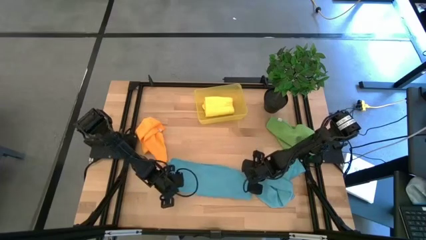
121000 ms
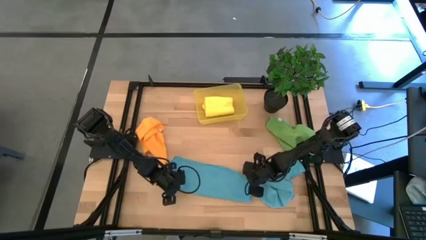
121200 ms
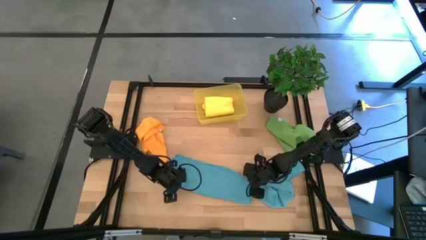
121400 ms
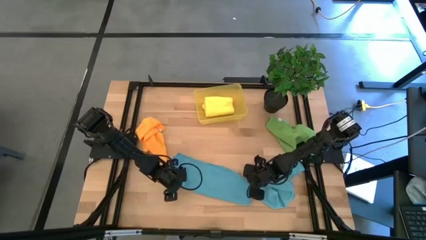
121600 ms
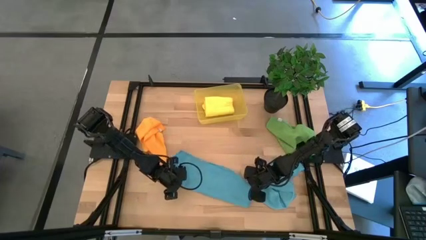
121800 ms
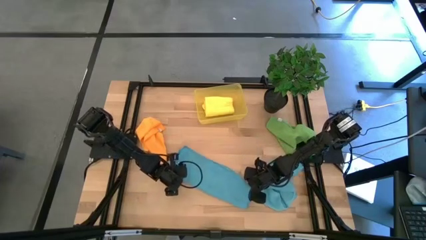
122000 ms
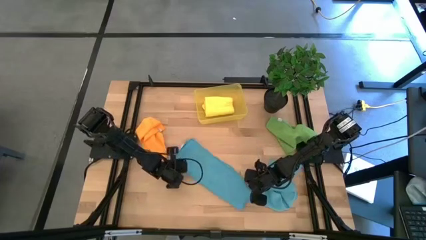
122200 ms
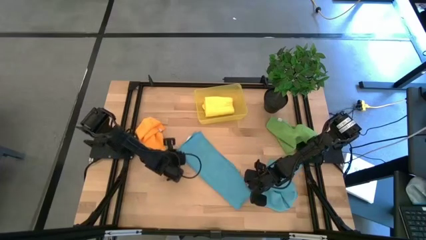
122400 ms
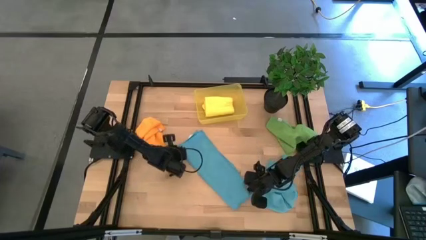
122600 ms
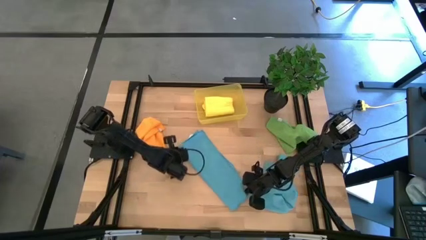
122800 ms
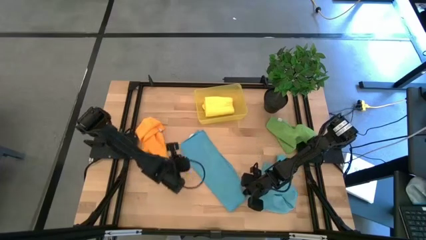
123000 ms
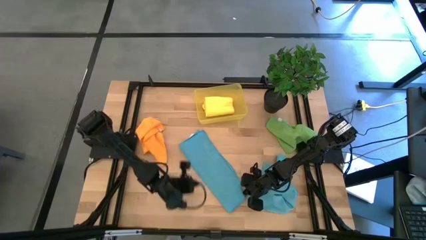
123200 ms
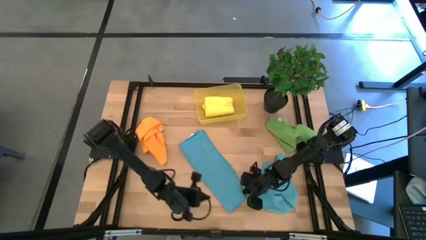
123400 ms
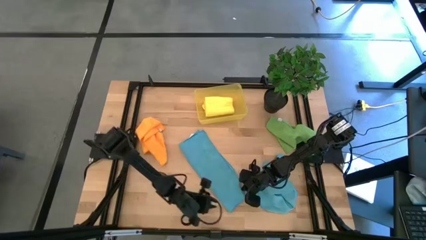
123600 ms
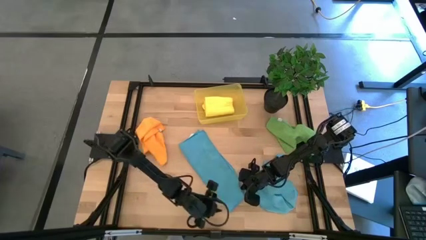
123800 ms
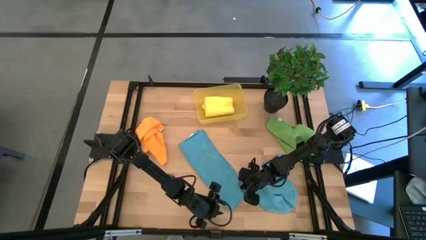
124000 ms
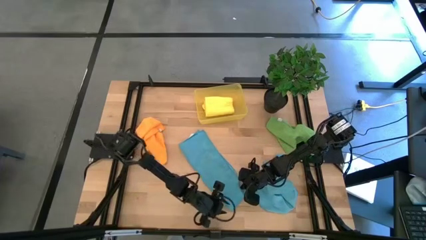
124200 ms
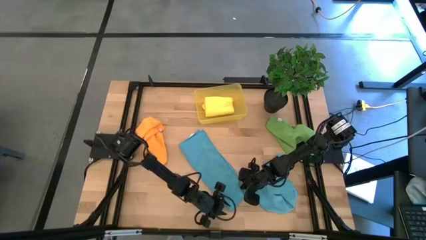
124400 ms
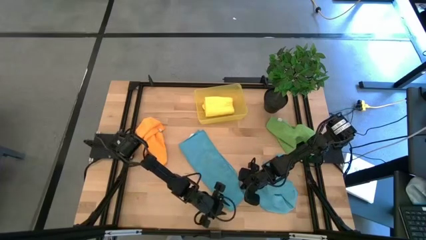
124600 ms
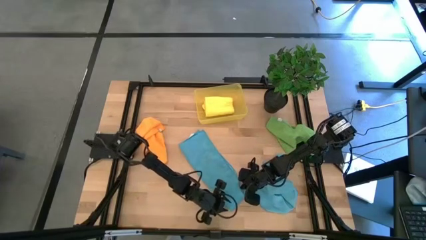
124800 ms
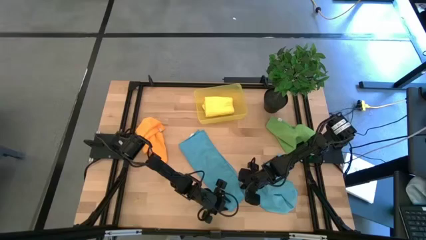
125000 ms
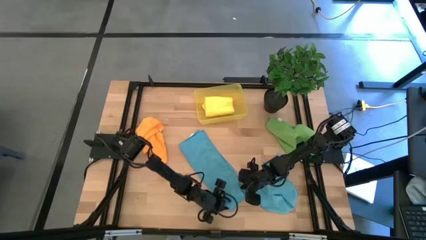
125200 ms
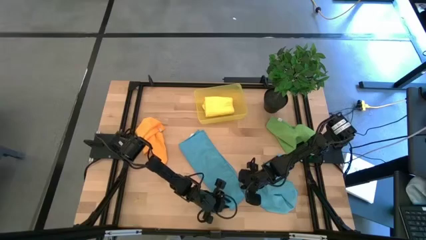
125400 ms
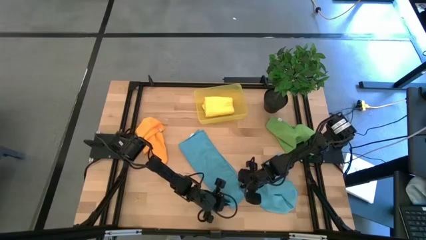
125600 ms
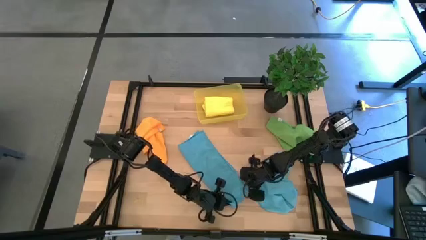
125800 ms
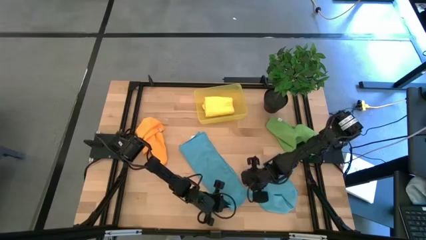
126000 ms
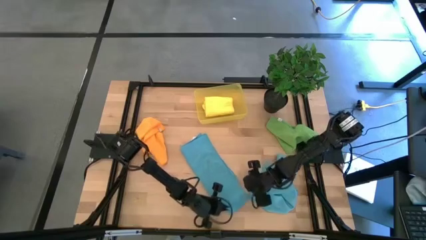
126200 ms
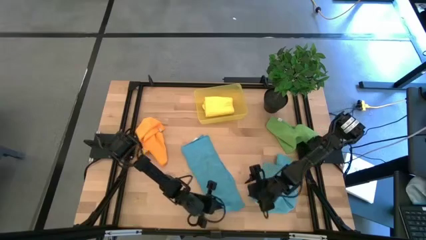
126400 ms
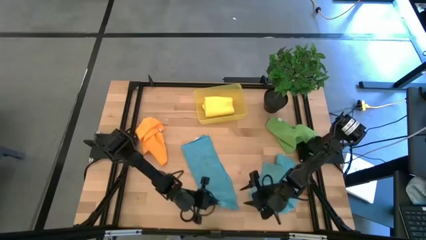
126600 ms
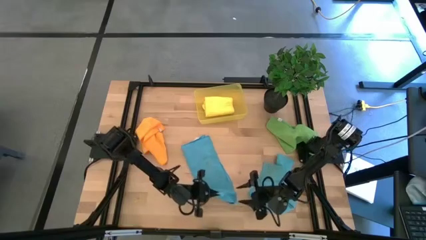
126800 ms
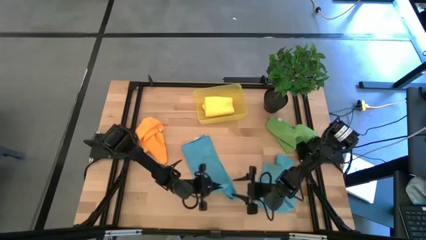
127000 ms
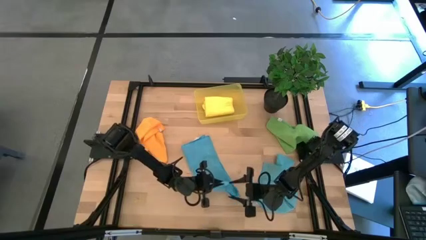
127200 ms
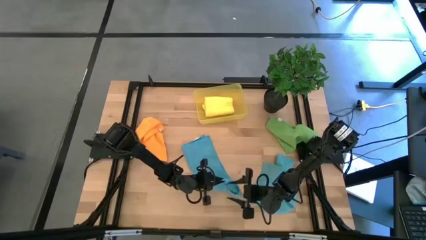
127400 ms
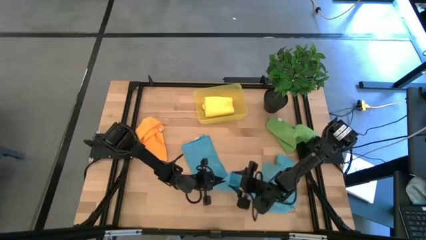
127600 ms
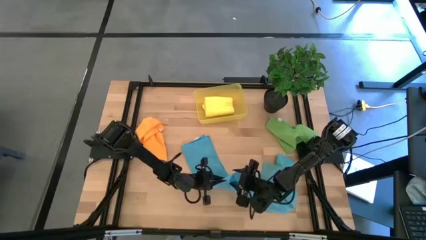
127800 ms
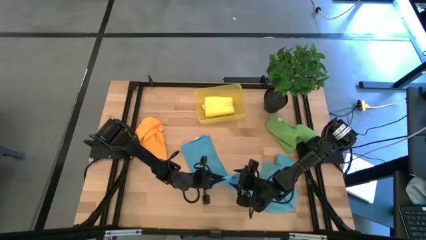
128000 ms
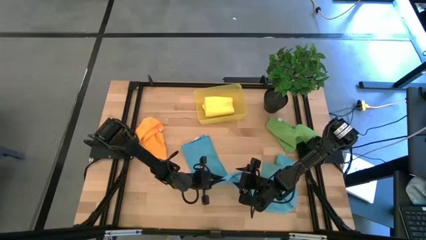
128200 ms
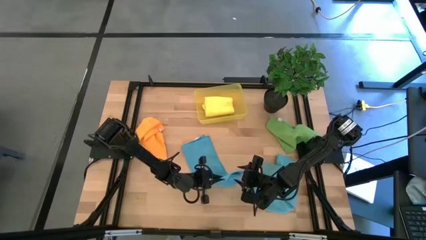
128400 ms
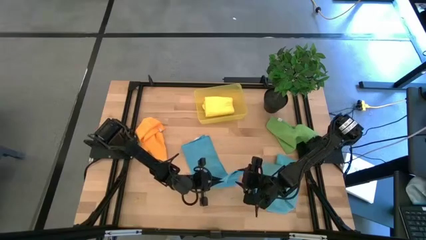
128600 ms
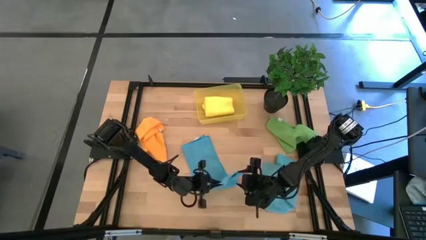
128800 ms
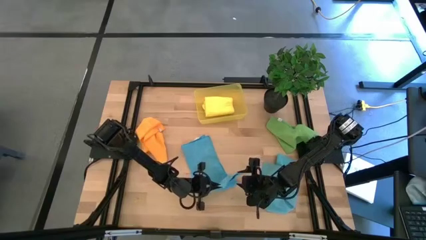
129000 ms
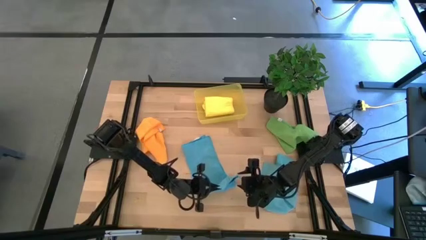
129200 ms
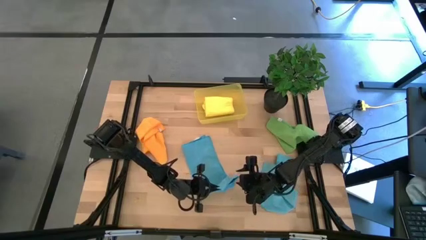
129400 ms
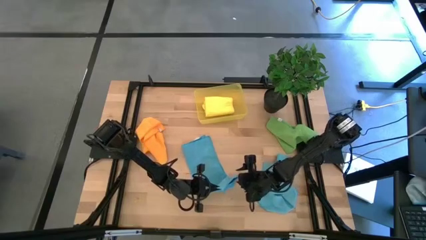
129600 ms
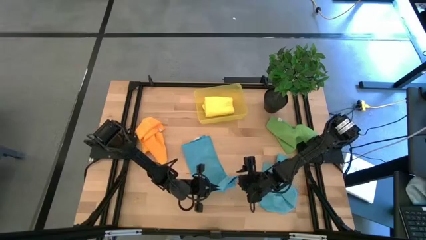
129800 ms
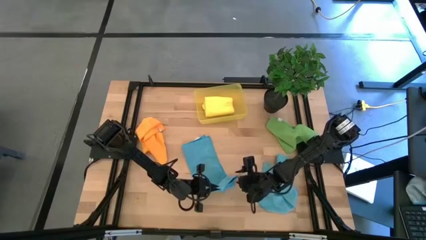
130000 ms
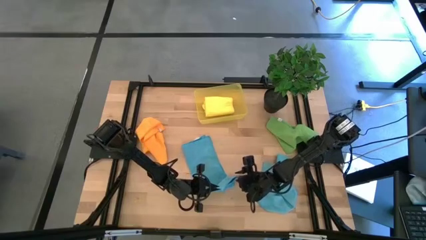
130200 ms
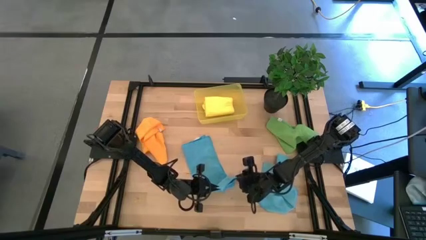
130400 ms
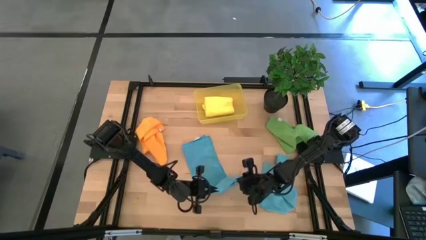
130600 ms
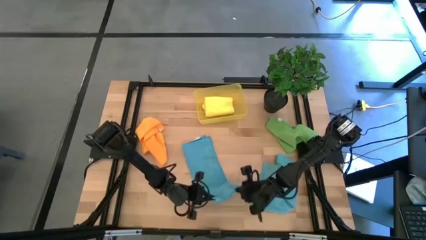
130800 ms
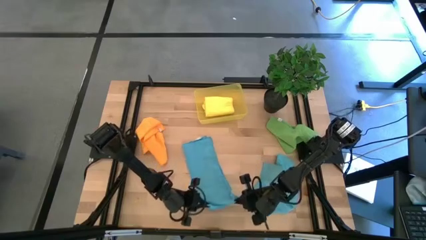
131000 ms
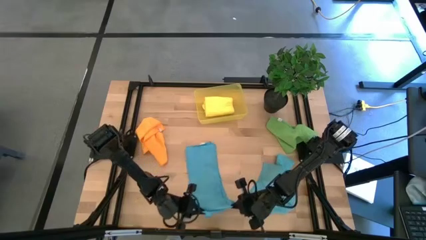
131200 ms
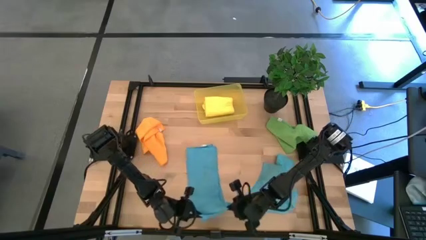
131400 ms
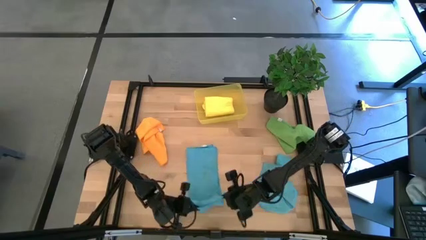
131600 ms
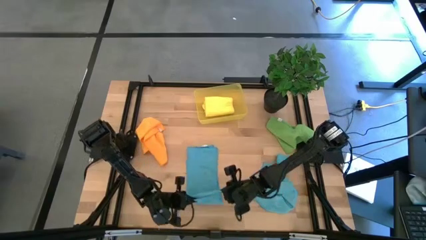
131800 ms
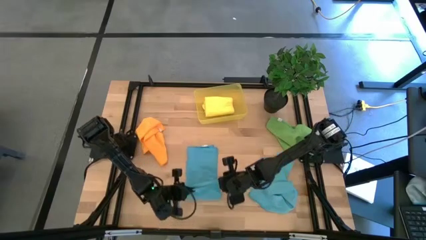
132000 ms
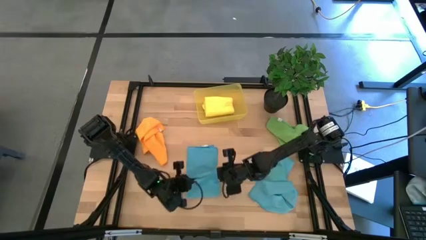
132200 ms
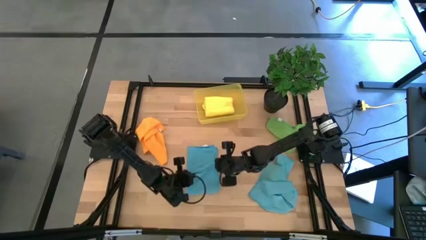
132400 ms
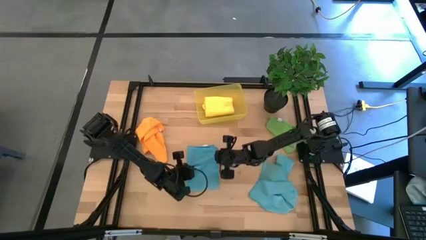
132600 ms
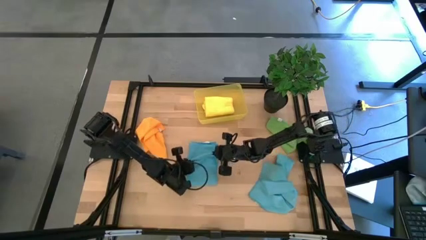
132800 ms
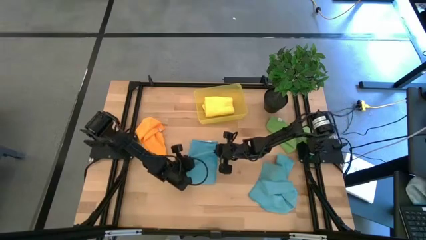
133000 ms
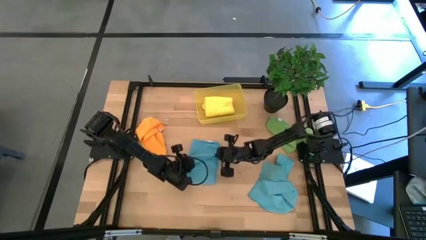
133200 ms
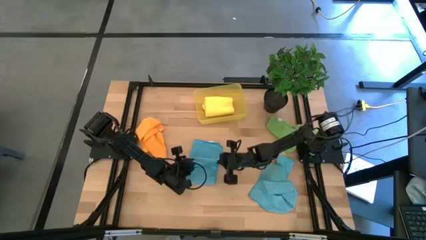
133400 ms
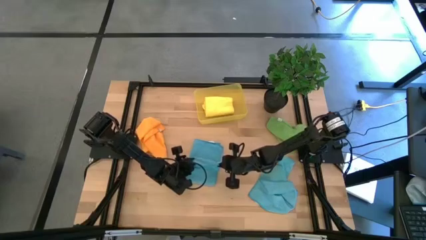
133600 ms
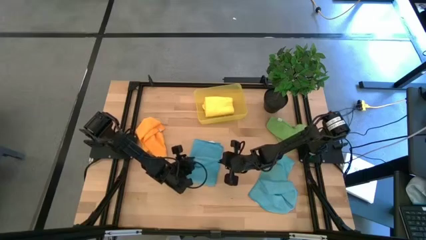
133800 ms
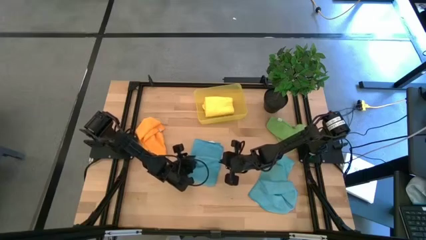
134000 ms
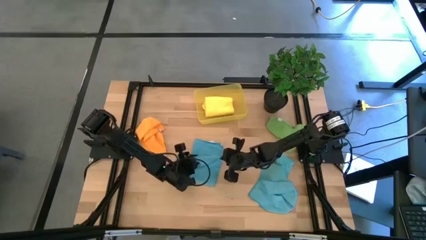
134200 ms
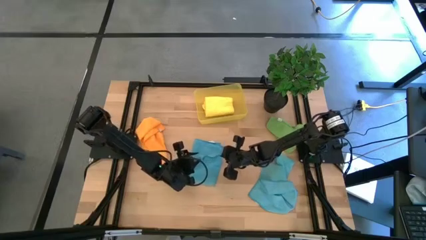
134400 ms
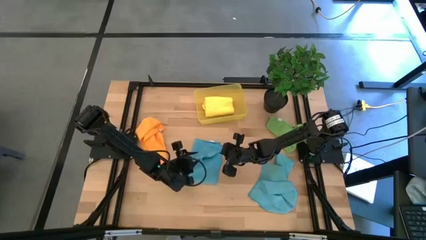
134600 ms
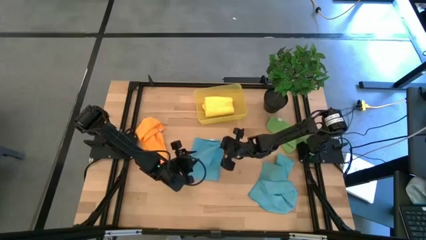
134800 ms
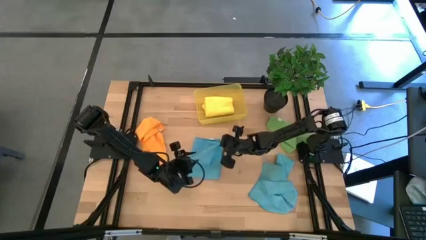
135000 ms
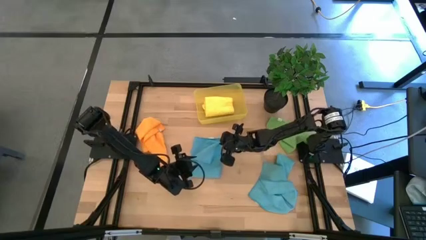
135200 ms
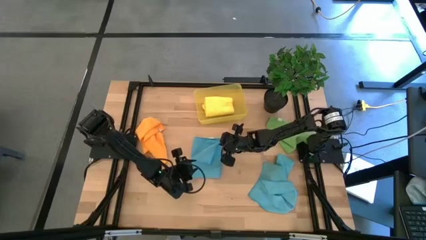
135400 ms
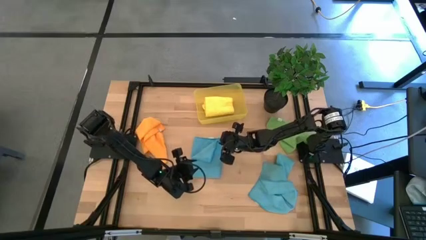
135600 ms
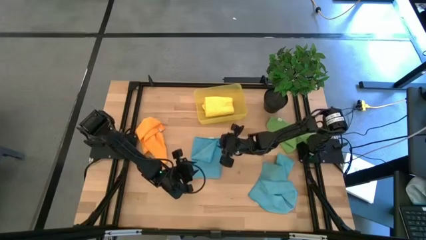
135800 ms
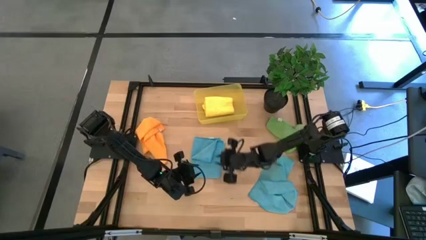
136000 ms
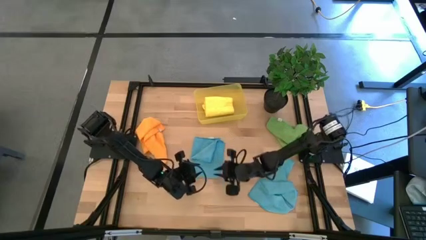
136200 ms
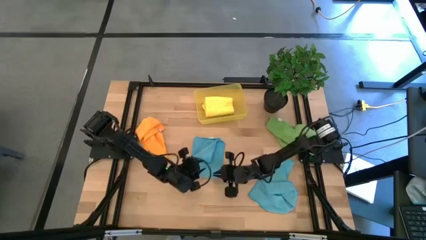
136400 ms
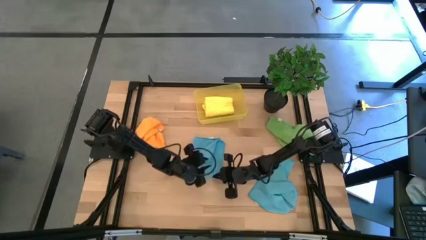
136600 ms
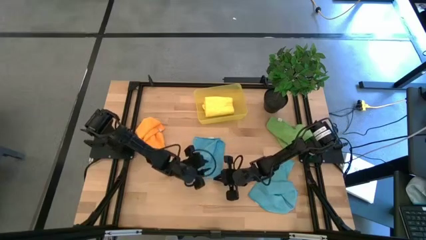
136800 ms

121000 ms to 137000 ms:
Task: Fold microfiber towels
Fold the left blue microfiber towel
